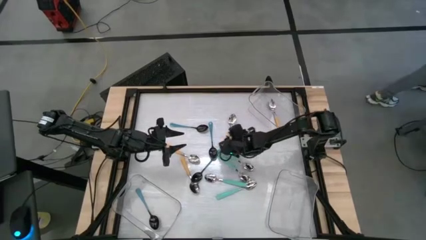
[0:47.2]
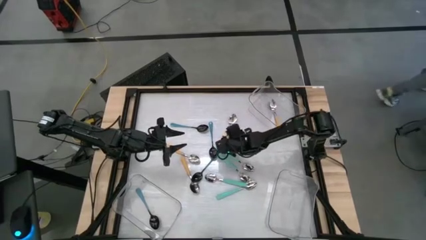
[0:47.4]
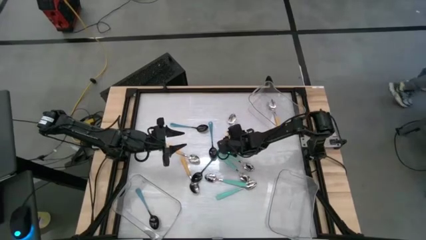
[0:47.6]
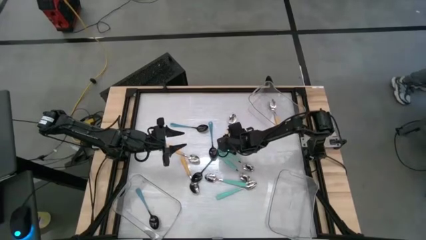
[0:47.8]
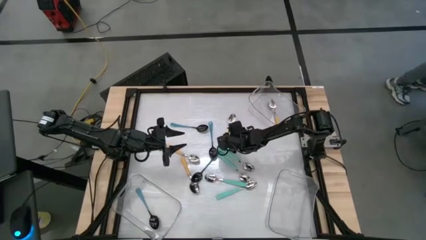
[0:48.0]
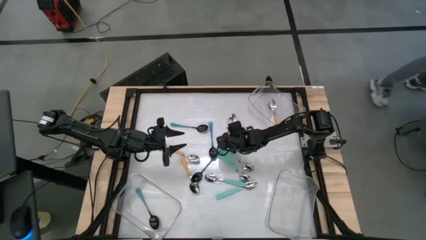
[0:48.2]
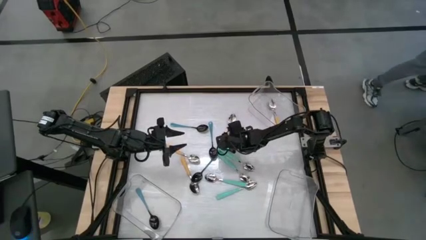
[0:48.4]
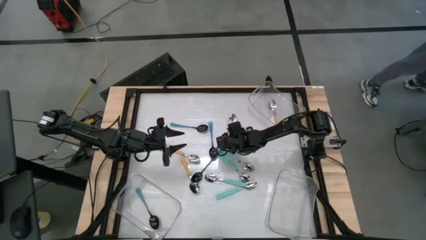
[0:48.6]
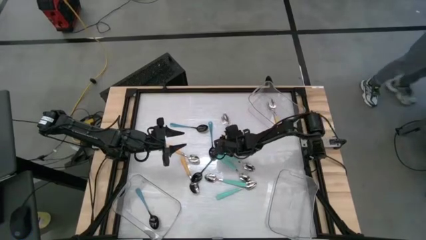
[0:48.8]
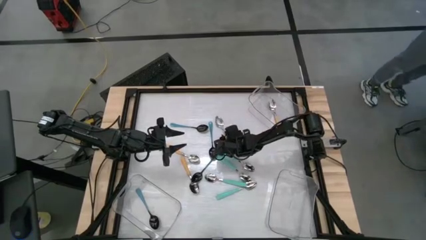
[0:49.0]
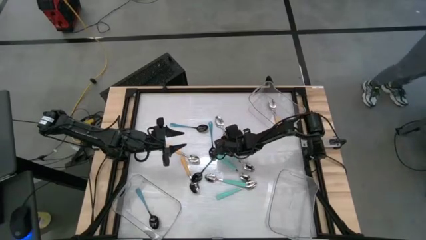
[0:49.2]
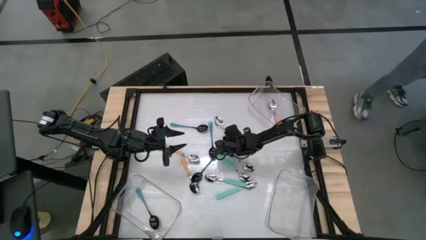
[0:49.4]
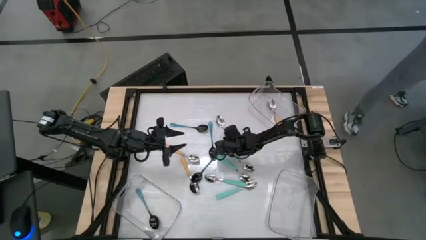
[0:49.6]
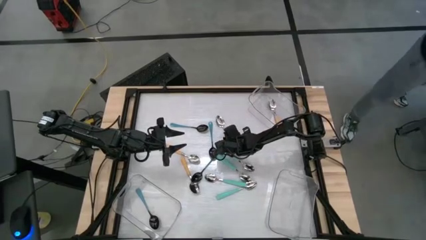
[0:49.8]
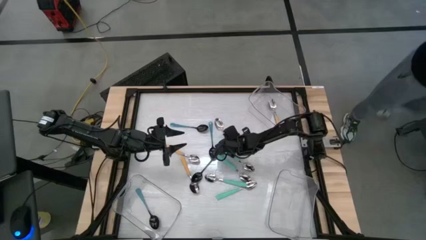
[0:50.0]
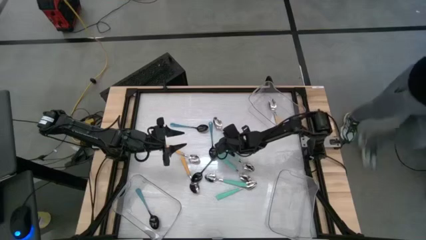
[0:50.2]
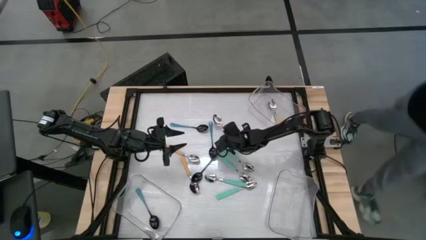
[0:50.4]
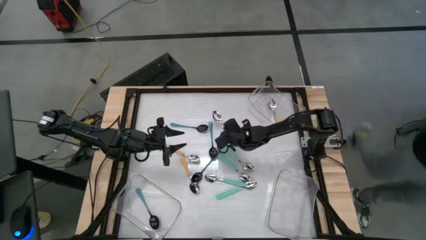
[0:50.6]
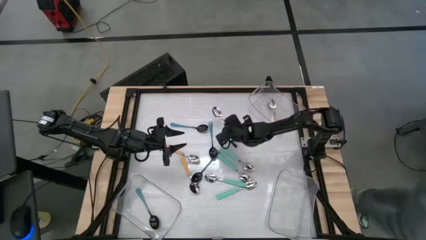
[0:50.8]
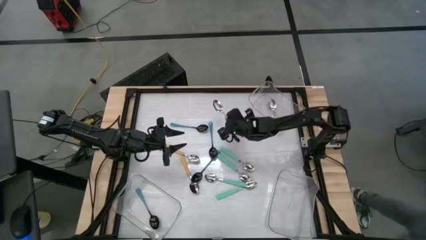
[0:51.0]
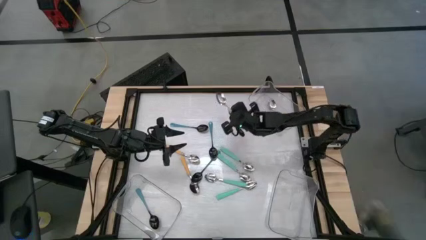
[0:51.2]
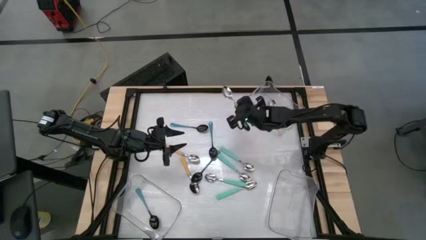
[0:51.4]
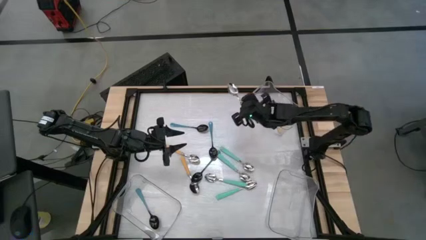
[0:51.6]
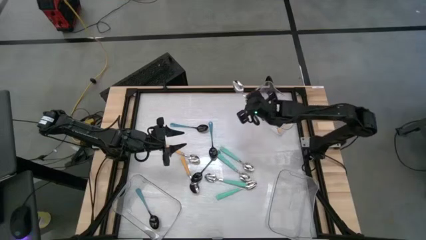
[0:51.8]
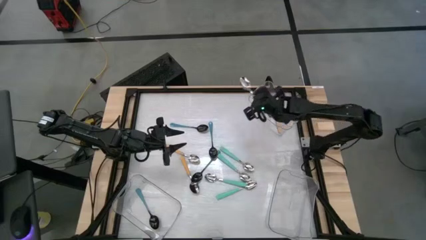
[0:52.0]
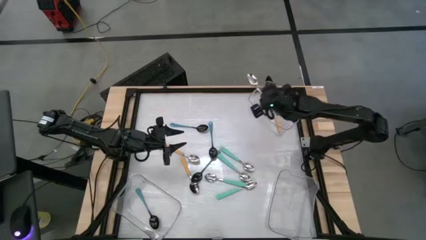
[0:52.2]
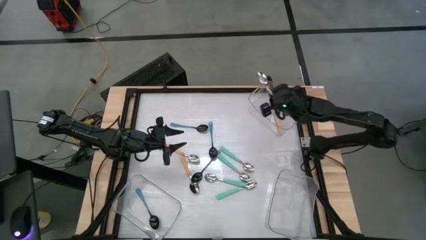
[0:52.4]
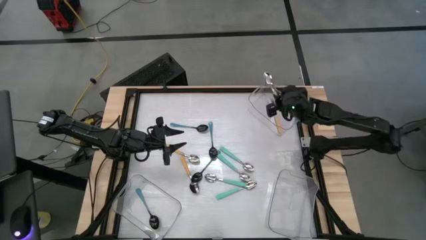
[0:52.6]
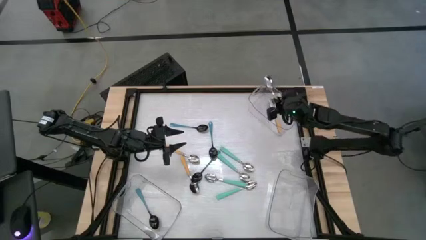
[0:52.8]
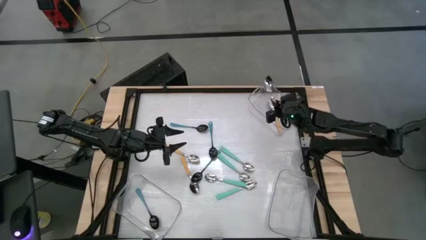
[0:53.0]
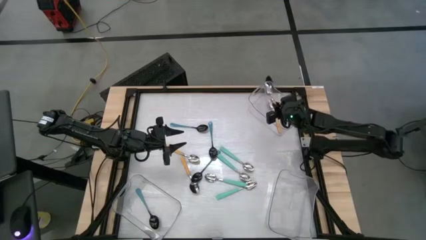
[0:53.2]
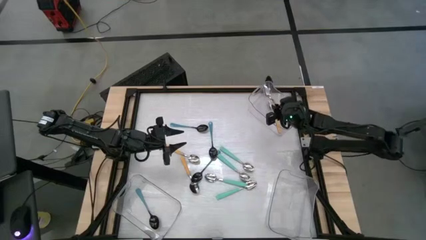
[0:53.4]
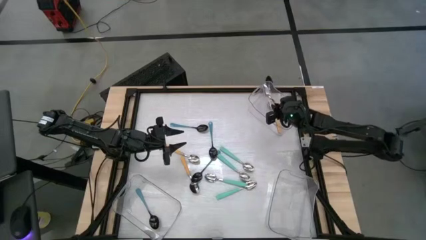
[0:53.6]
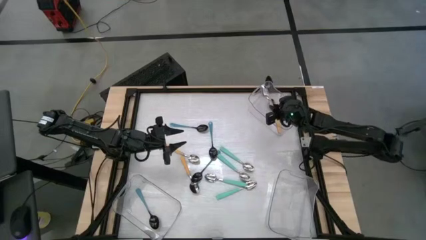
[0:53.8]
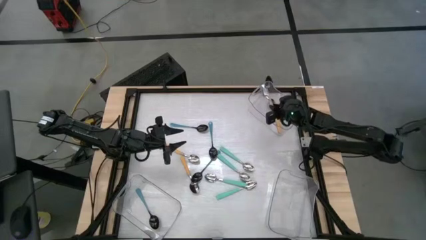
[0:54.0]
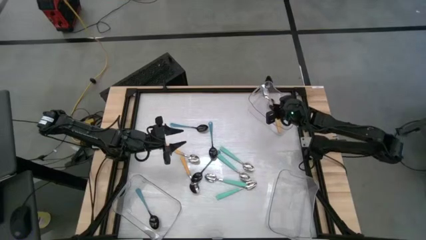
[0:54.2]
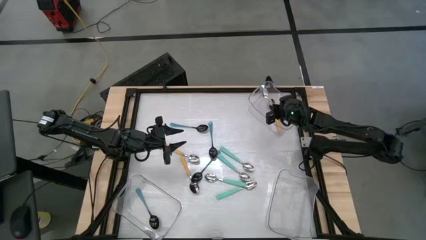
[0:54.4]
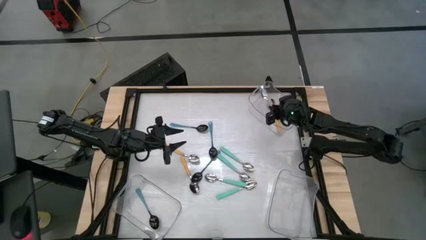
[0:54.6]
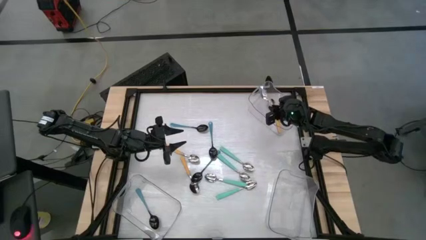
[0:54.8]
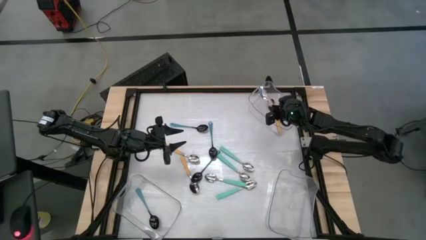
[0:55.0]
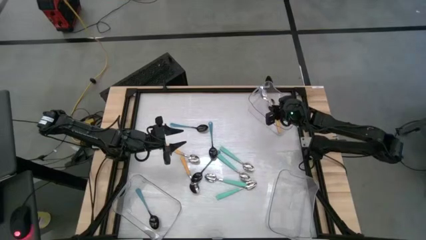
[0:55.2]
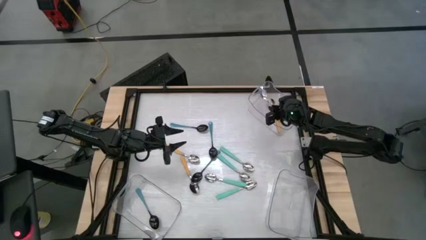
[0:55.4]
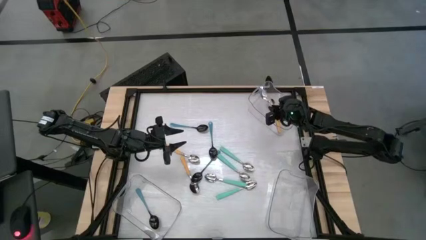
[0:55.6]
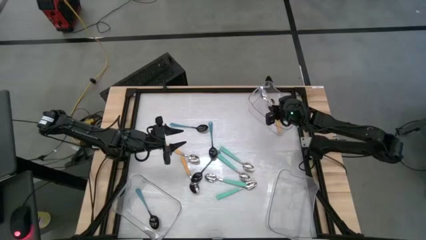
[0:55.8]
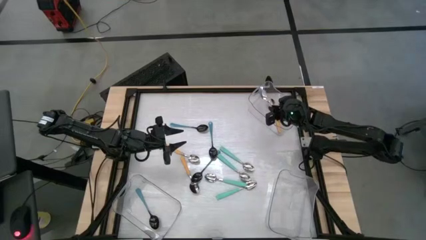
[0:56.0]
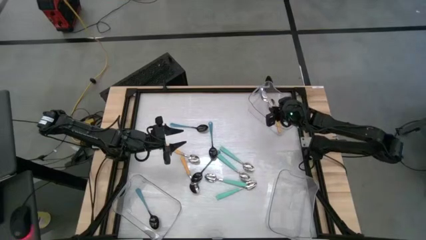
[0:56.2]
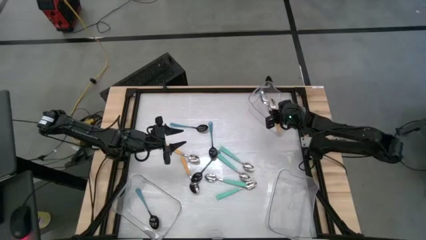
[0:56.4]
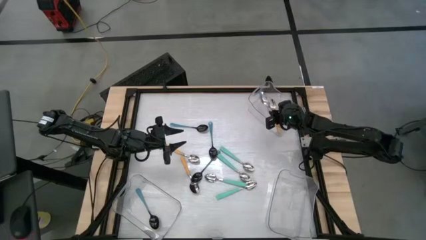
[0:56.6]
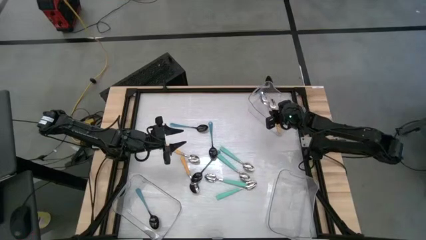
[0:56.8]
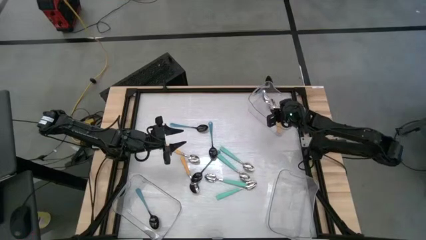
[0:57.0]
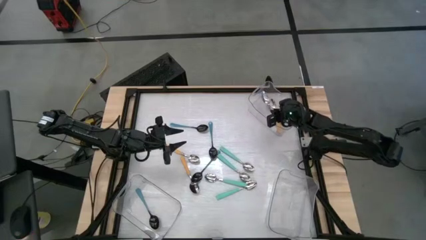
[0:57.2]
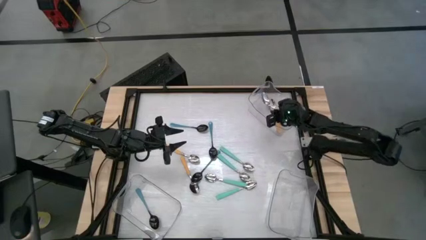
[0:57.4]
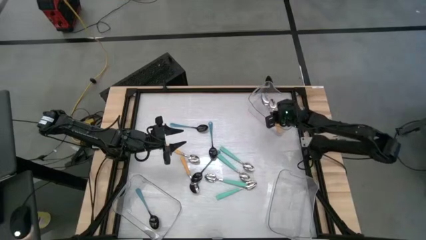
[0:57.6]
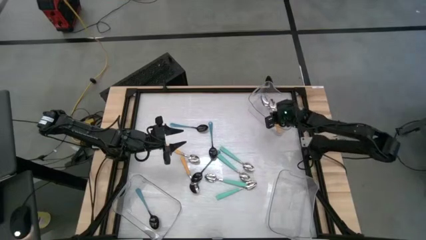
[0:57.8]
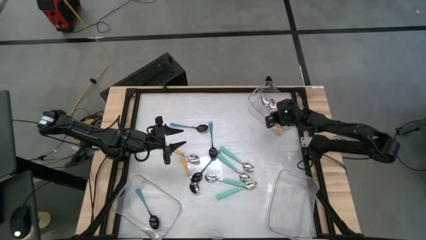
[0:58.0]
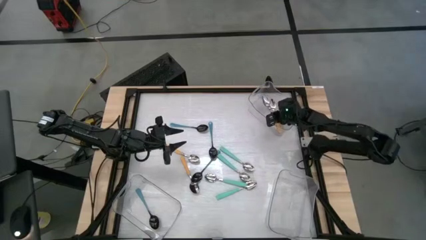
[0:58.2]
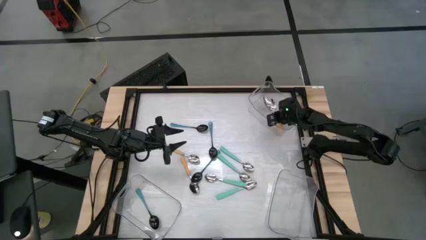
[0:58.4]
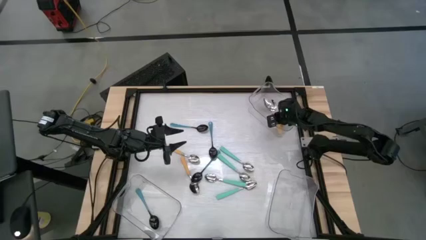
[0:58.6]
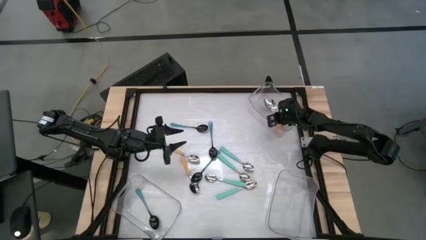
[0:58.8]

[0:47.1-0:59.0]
Task: Sort silverware by color (type)
Put the yellow spoon into the top transparent bin
